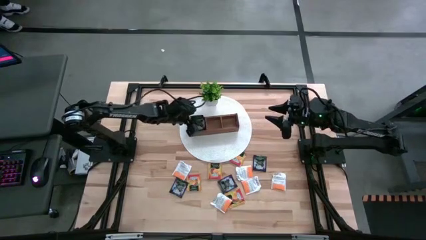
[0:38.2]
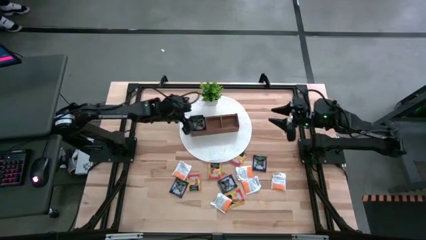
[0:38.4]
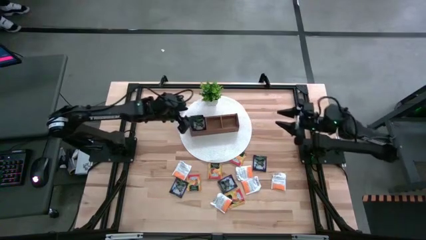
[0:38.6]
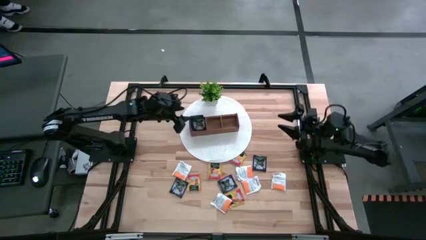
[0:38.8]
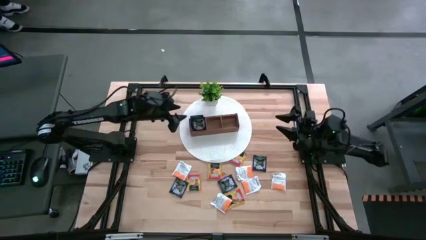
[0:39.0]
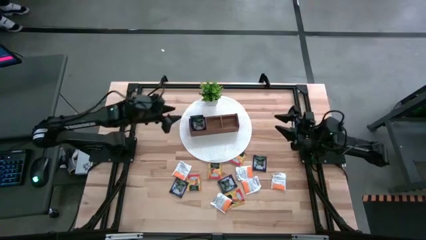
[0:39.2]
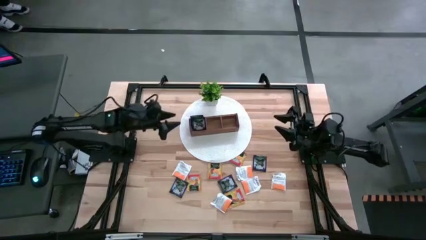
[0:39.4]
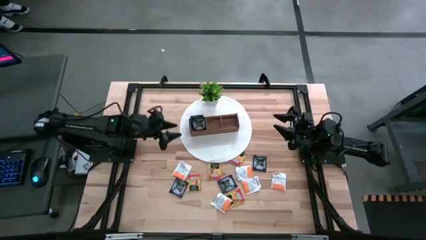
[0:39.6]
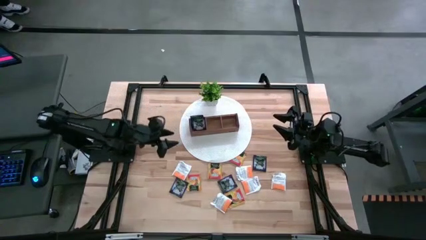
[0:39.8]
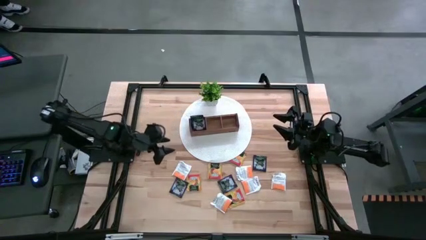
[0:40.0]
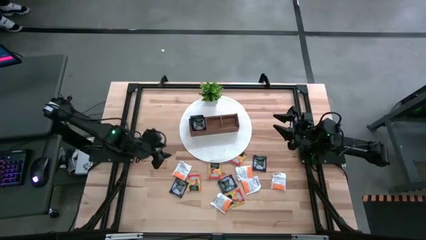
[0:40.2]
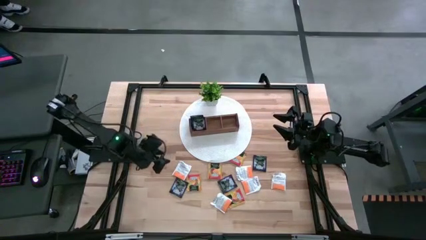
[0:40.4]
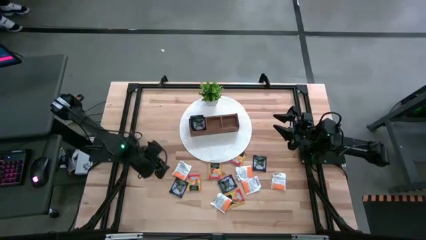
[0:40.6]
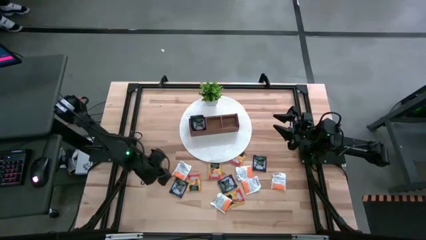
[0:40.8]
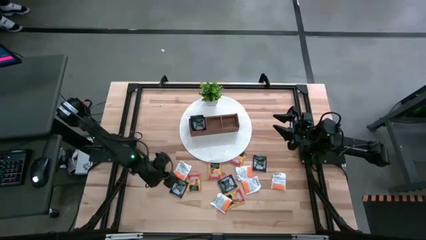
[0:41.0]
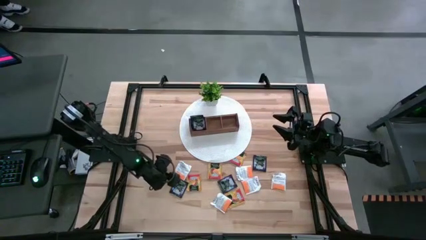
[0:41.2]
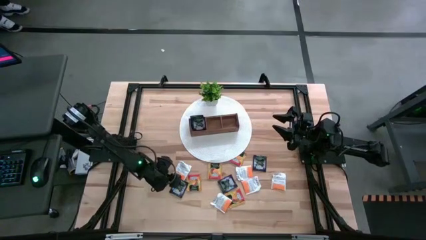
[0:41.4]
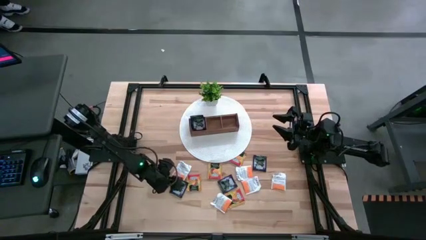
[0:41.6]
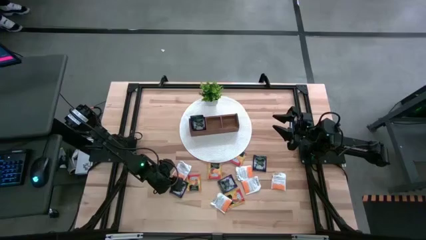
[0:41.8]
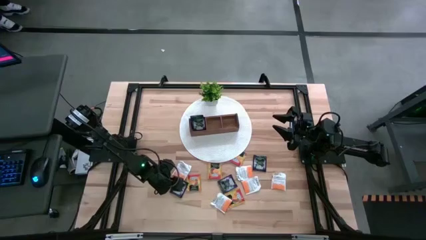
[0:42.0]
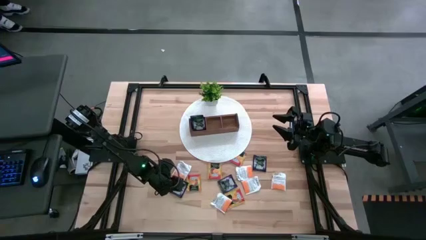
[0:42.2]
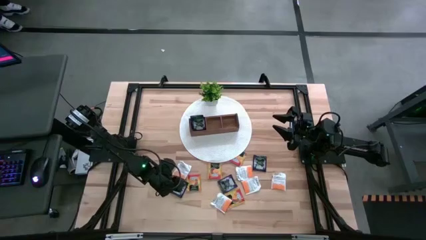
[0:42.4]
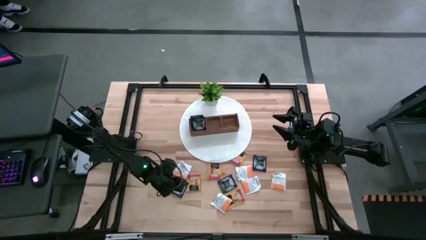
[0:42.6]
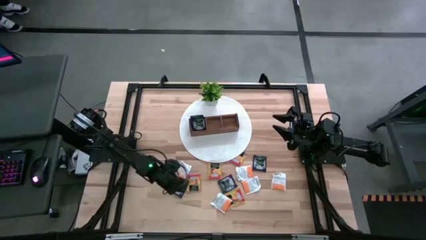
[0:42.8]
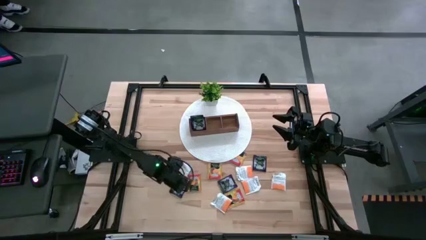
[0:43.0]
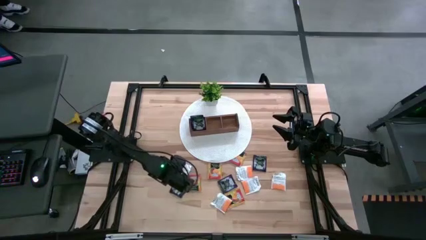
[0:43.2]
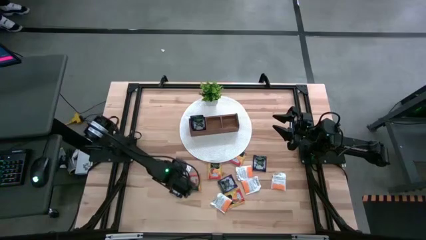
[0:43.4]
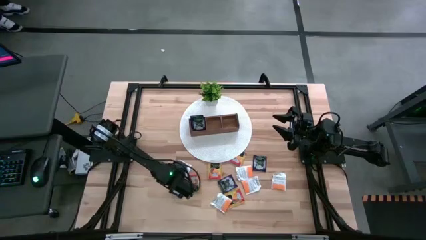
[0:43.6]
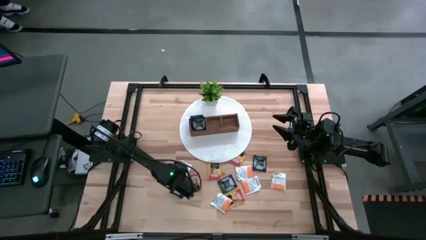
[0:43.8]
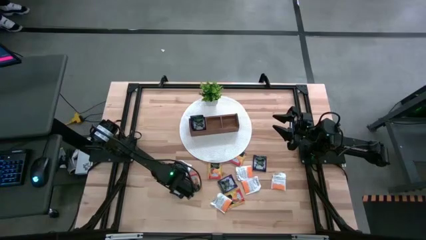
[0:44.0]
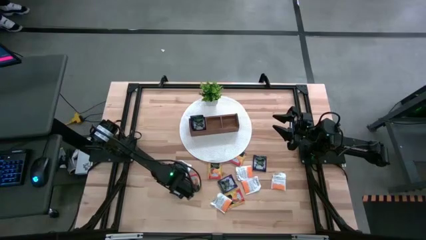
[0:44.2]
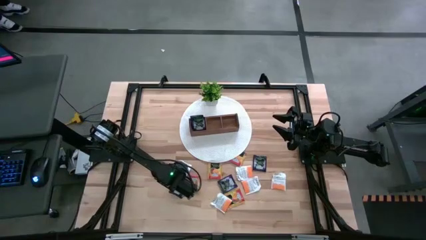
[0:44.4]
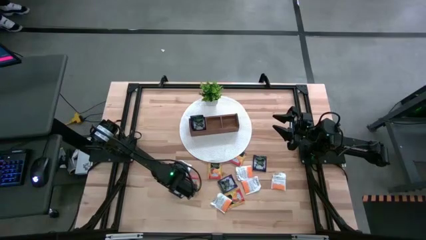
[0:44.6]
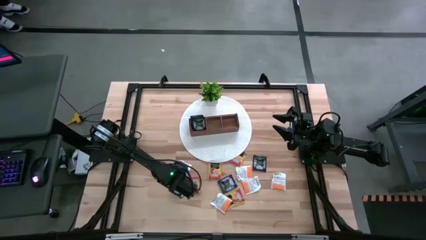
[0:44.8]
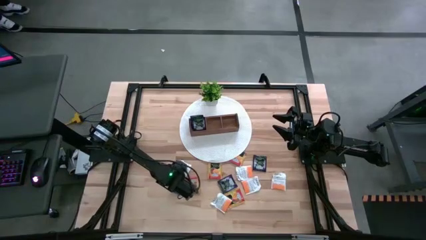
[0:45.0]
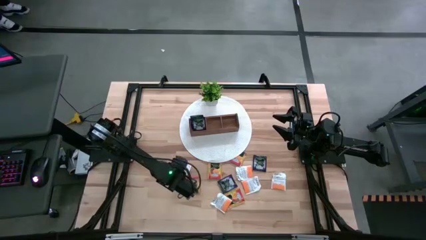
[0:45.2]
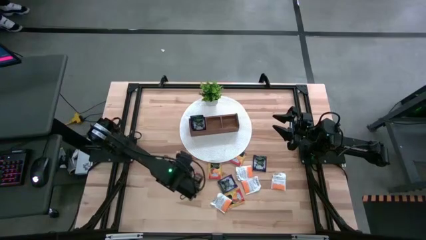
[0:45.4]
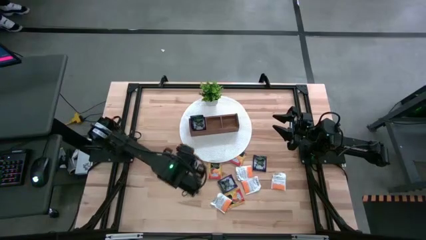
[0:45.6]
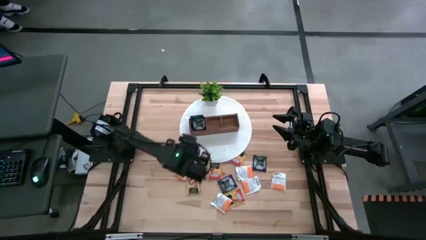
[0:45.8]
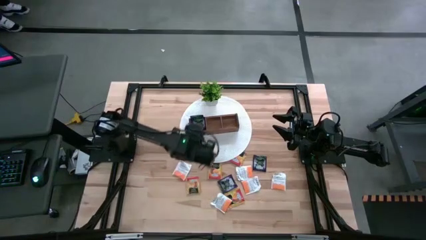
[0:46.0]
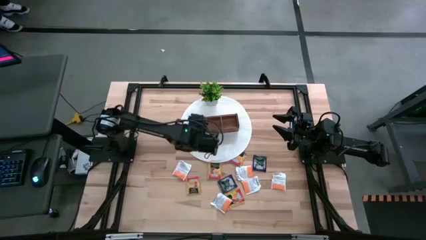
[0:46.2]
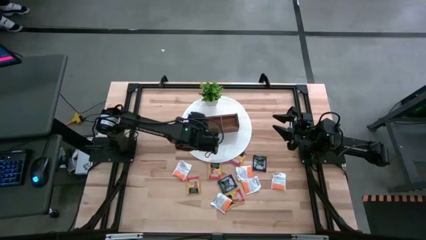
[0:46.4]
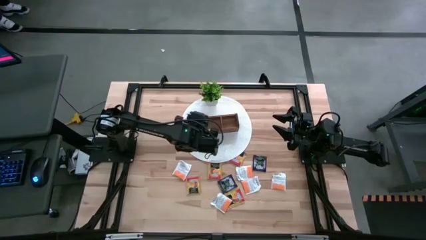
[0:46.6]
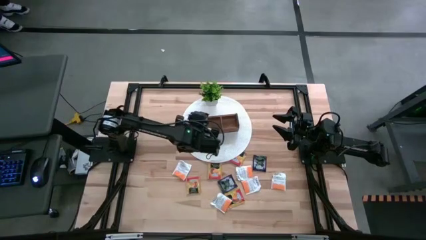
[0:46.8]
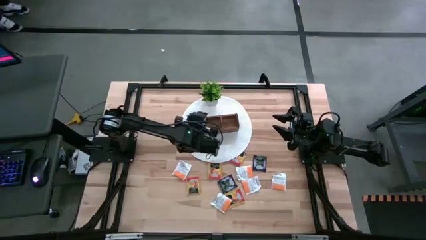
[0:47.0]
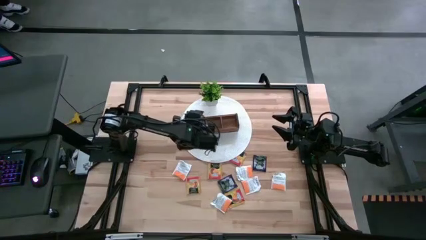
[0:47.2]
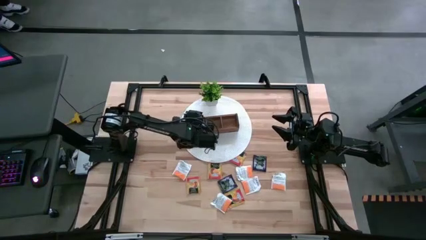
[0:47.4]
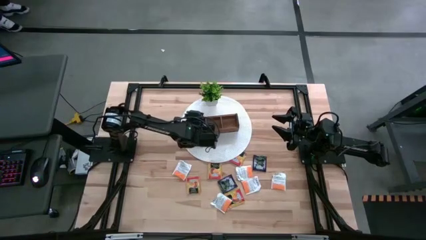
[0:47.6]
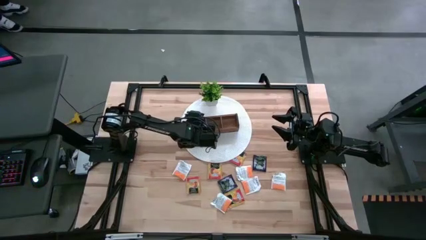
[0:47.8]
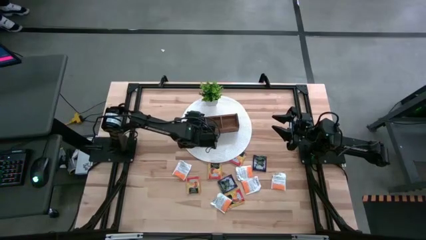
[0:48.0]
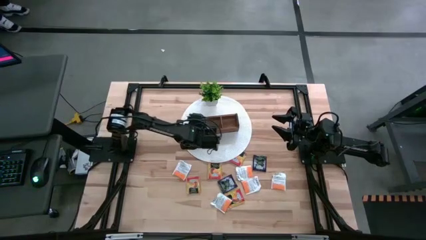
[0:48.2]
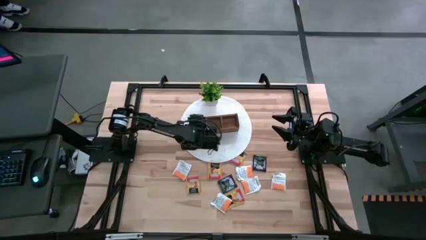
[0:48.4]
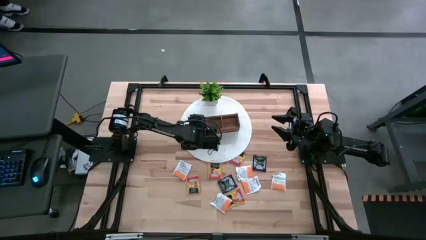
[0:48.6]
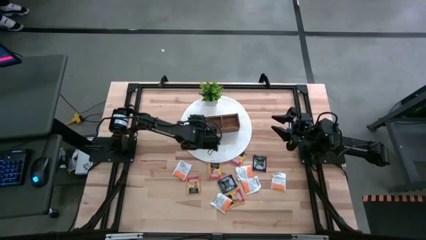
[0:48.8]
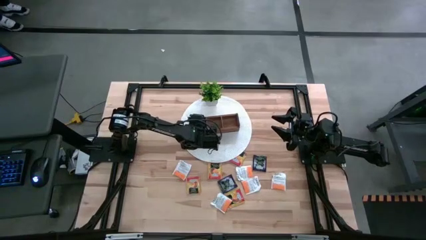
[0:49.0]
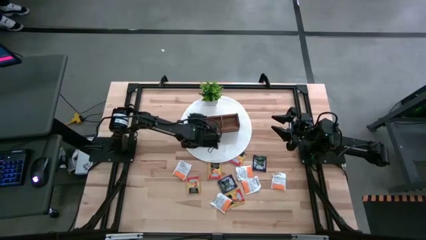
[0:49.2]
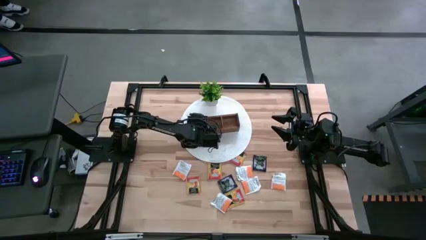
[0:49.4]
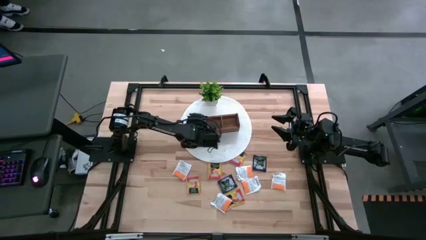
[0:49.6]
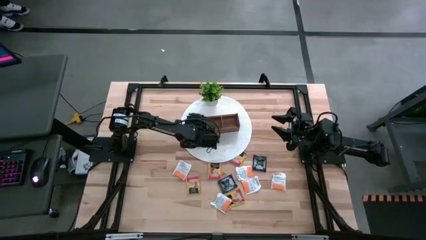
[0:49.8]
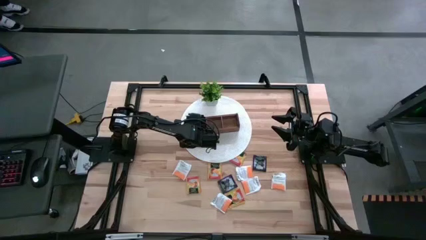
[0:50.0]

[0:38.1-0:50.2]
Task: Pick & Place Tea
Put the black tea bag into the left section of the wooden organizer

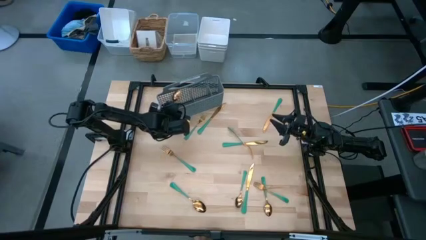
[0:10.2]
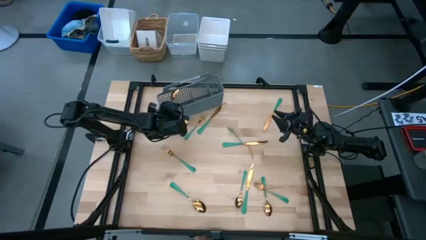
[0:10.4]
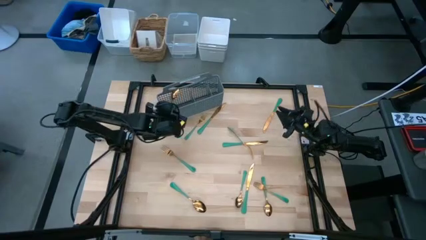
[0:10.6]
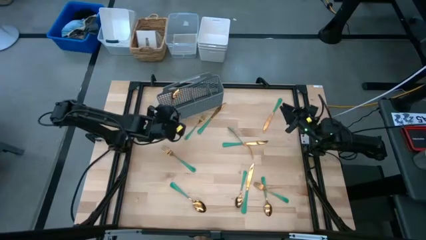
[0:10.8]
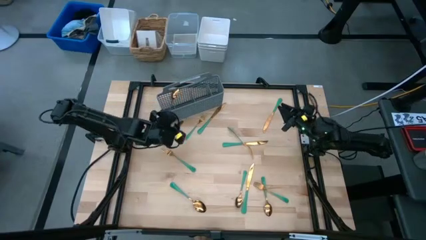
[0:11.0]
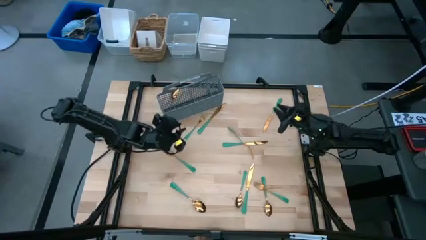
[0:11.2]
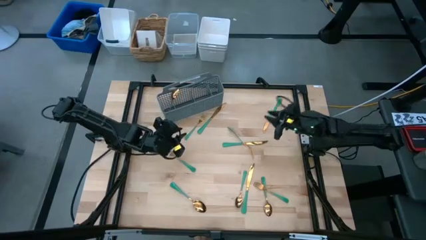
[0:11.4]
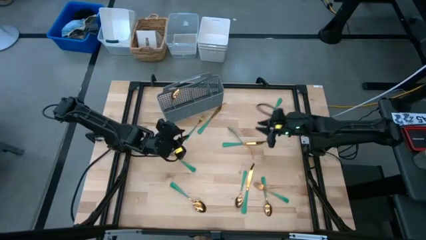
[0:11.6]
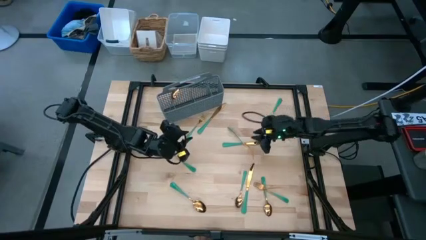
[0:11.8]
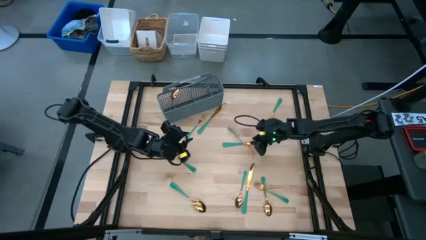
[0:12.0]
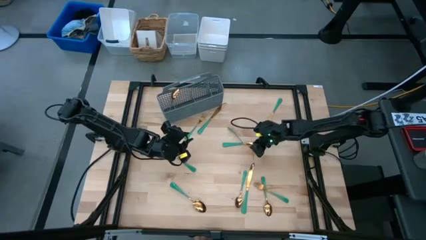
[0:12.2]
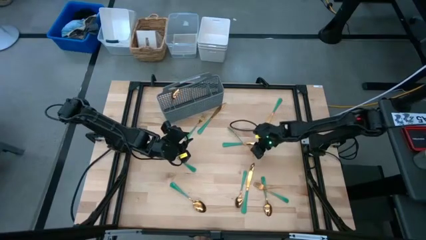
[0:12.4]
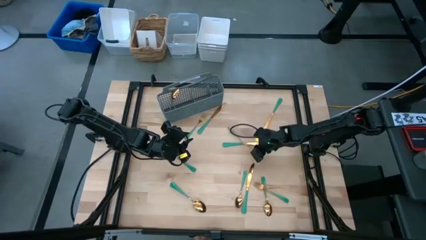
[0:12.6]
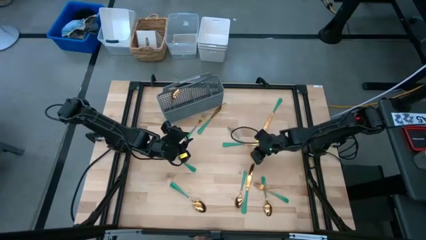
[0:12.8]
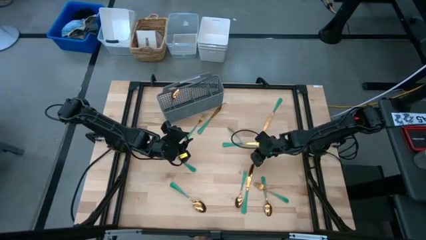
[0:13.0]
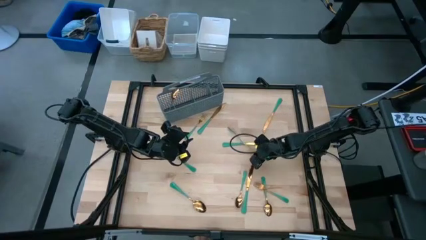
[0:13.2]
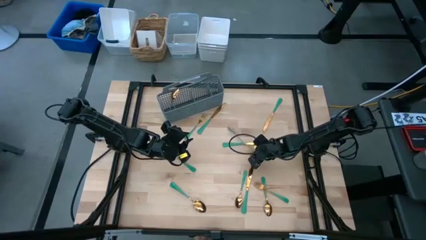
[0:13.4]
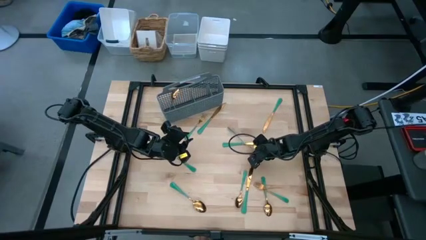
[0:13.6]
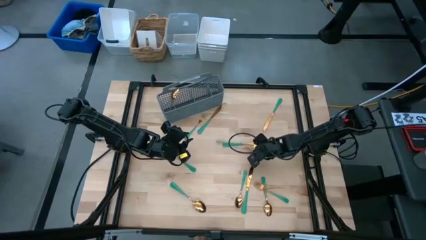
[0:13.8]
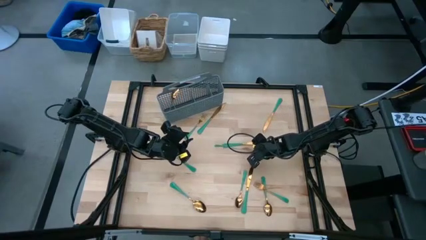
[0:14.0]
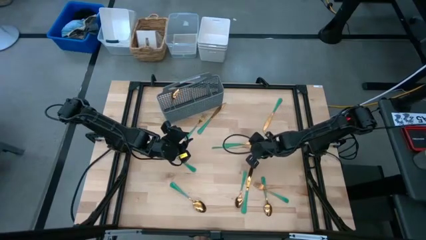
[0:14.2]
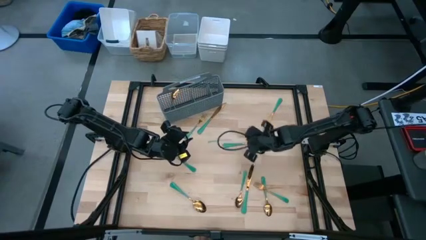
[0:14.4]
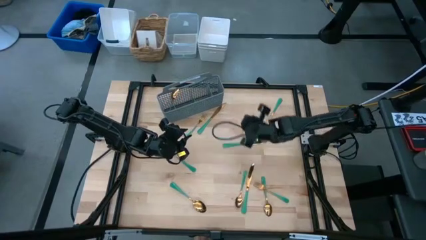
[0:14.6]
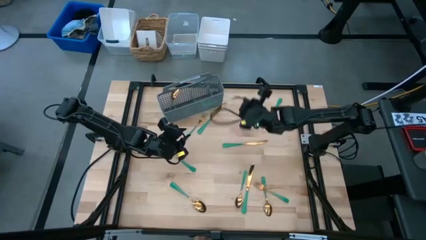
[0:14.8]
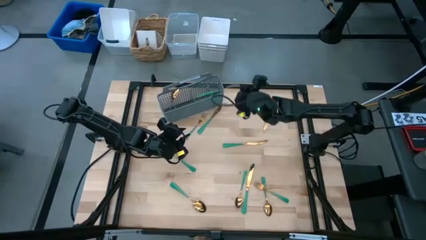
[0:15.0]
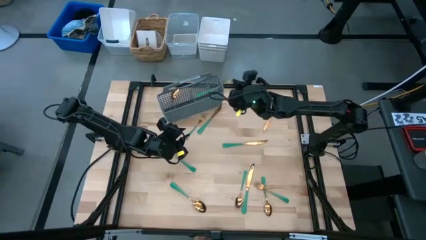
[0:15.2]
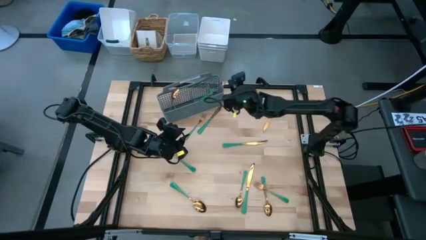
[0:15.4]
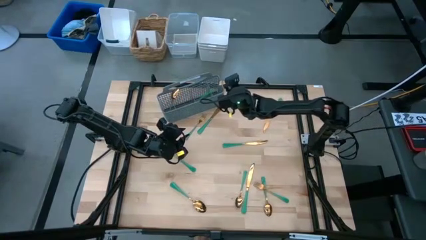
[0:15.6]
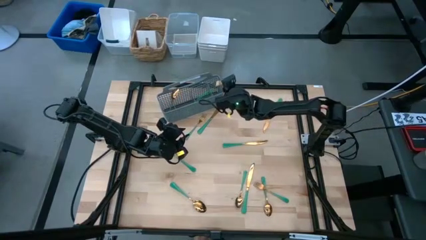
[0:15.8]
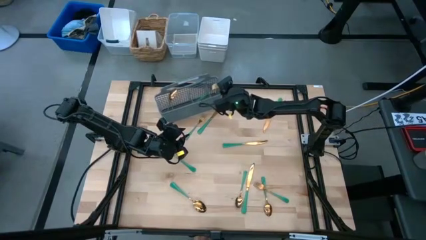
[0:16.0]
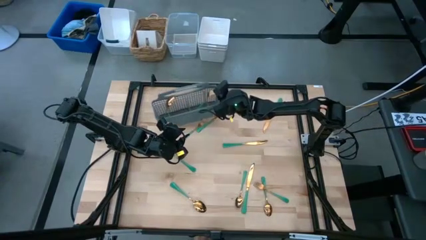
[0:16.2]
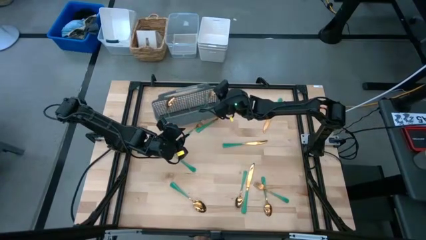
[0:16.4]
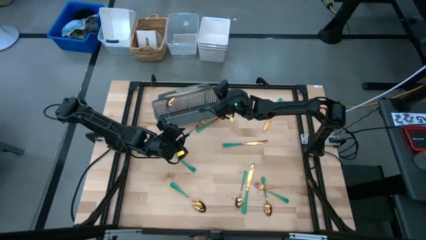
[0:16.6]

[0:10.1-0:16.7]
Task: Sort silverware
Put the fork into the middle right section of the silverware holder
